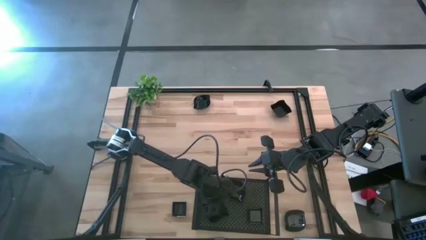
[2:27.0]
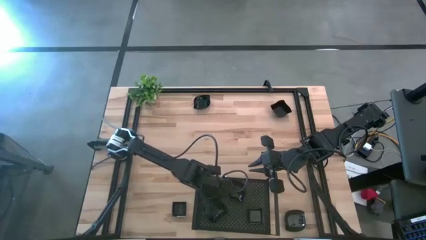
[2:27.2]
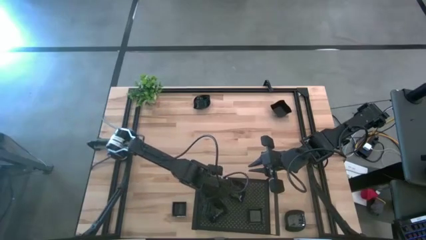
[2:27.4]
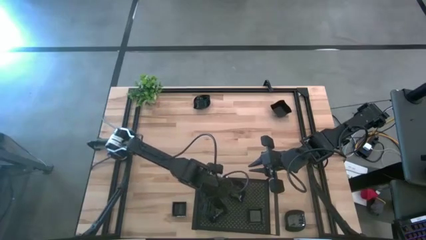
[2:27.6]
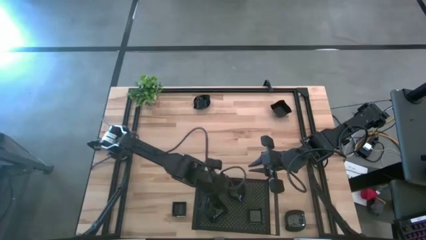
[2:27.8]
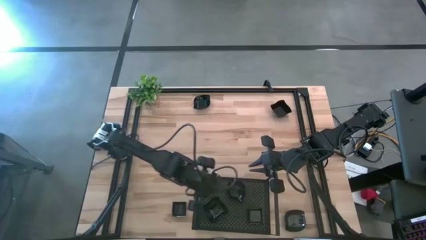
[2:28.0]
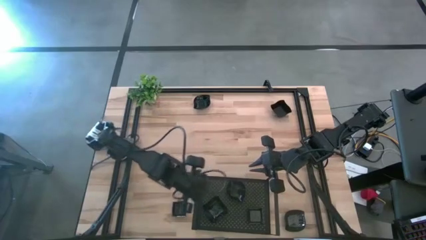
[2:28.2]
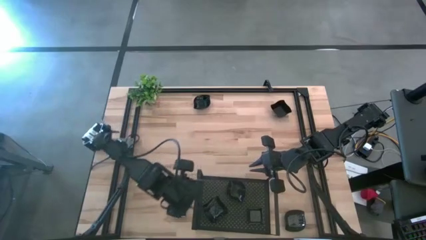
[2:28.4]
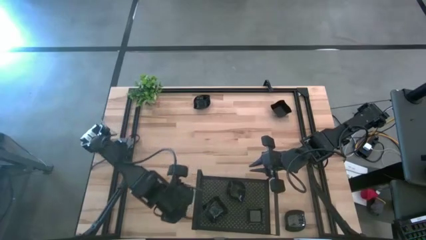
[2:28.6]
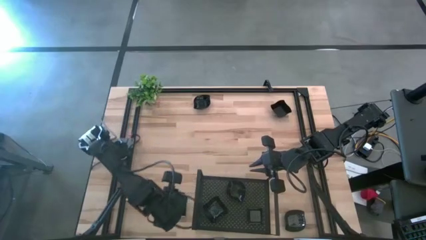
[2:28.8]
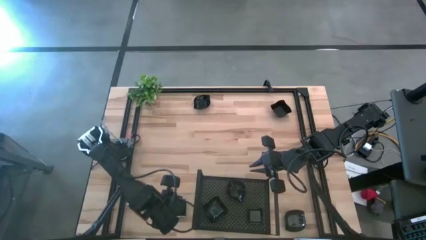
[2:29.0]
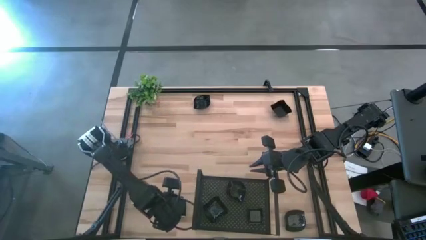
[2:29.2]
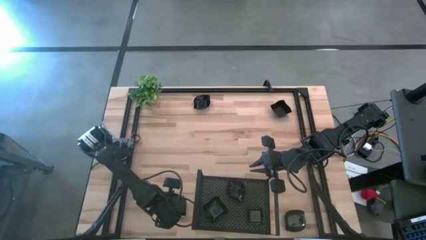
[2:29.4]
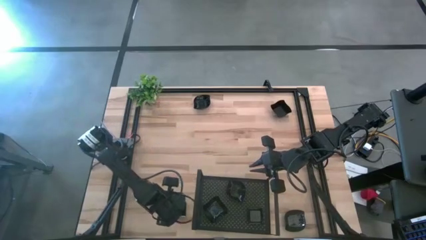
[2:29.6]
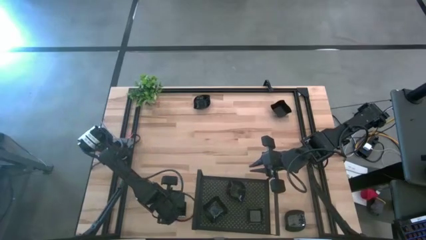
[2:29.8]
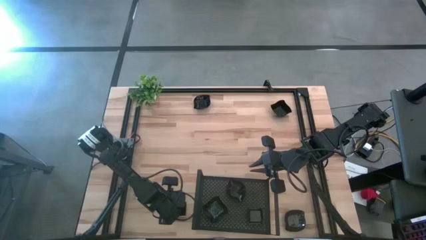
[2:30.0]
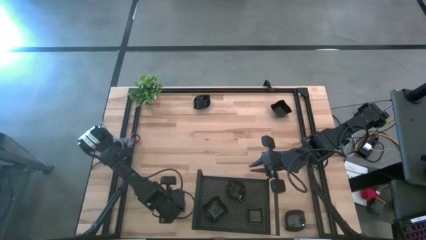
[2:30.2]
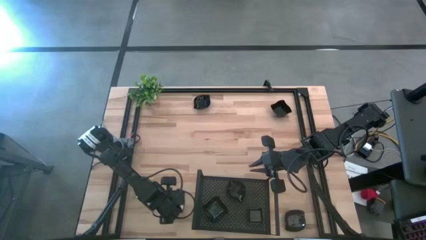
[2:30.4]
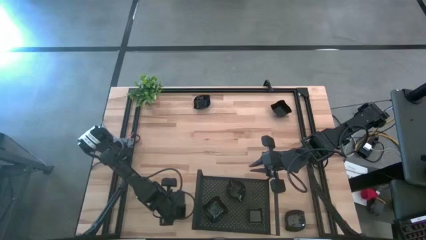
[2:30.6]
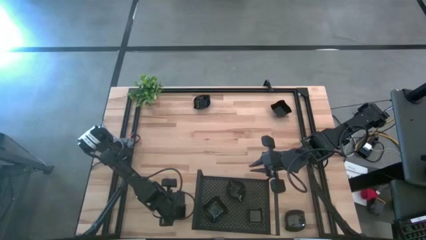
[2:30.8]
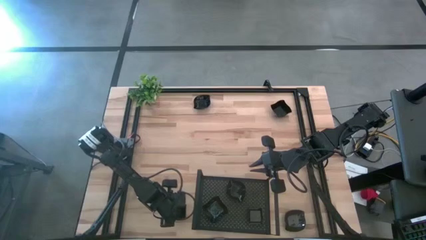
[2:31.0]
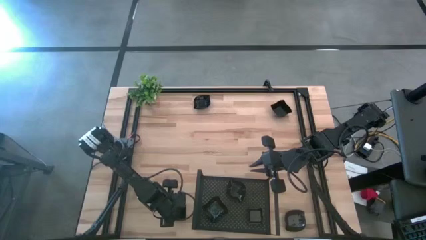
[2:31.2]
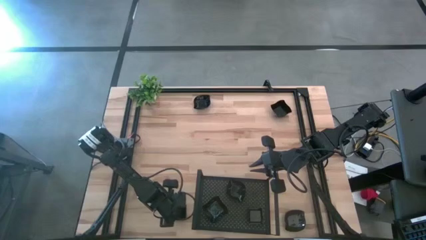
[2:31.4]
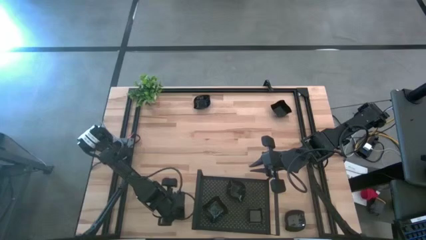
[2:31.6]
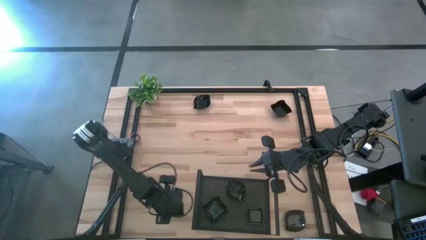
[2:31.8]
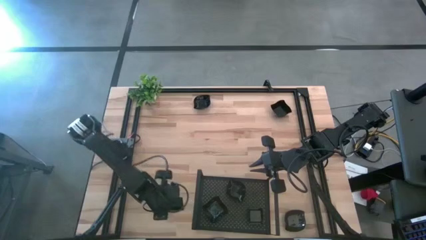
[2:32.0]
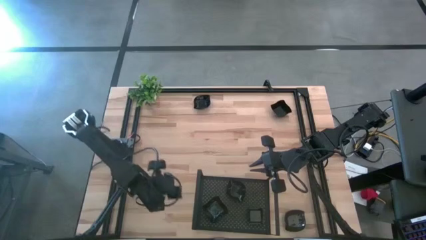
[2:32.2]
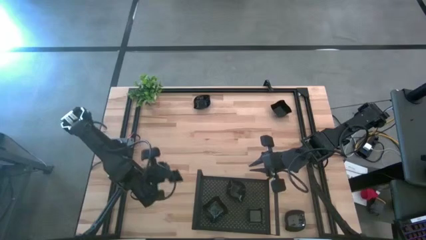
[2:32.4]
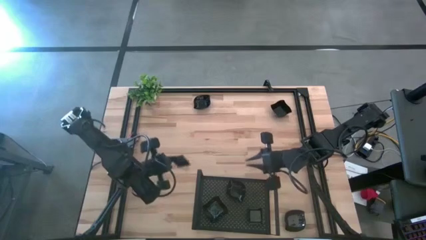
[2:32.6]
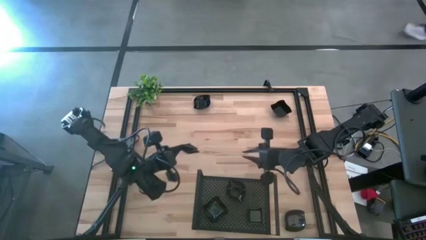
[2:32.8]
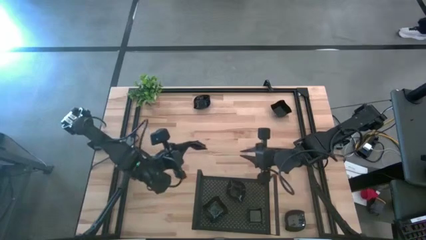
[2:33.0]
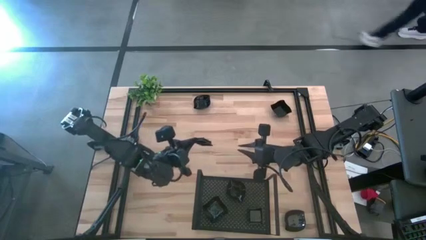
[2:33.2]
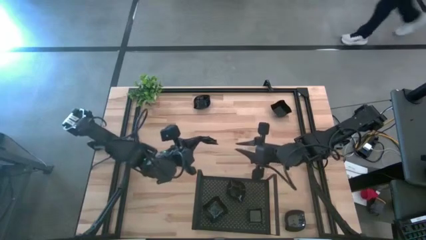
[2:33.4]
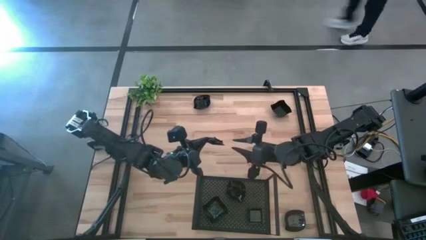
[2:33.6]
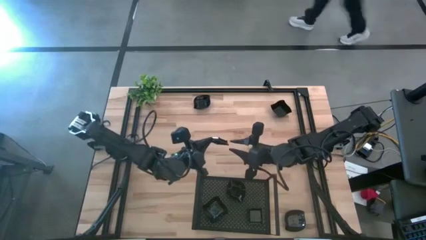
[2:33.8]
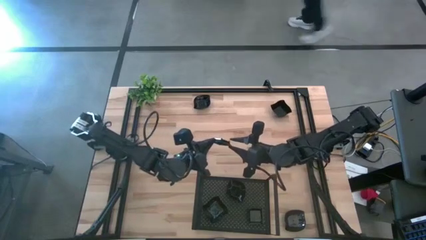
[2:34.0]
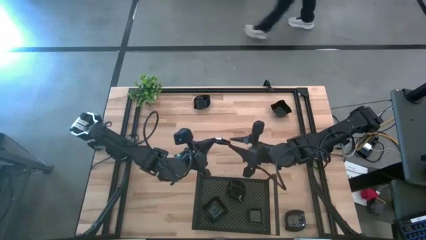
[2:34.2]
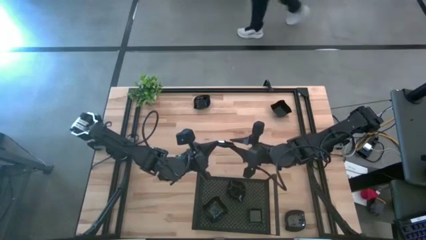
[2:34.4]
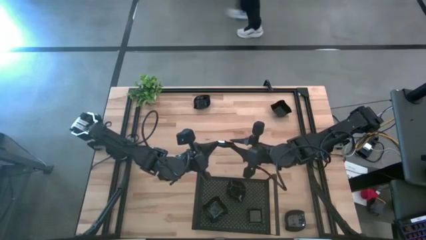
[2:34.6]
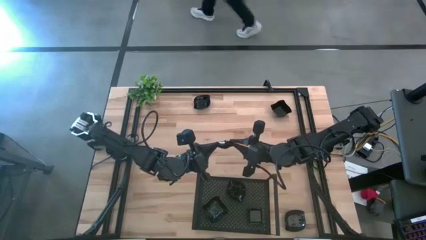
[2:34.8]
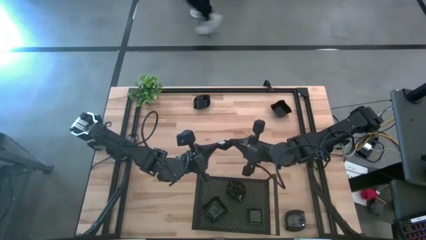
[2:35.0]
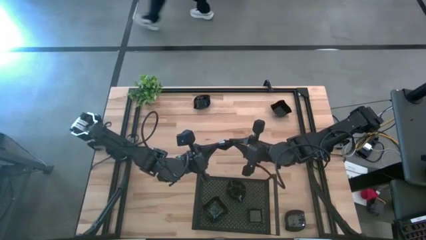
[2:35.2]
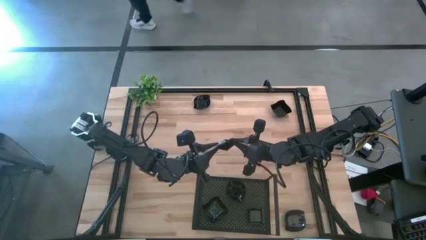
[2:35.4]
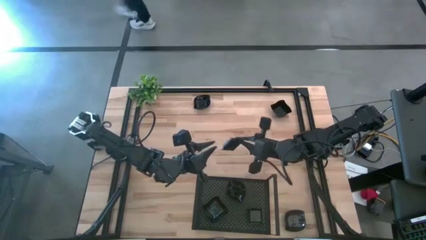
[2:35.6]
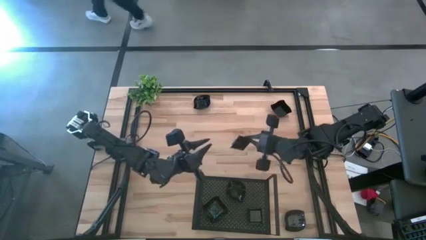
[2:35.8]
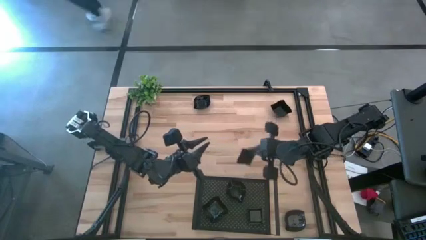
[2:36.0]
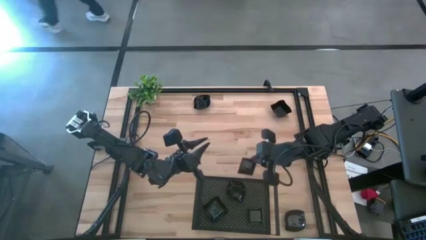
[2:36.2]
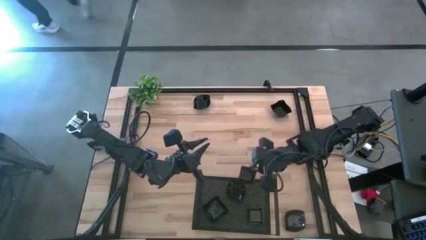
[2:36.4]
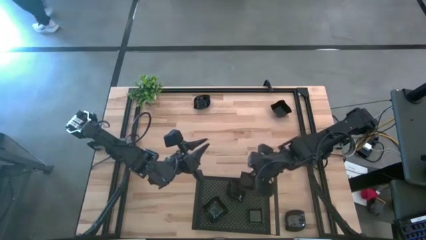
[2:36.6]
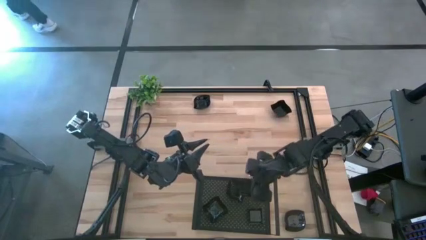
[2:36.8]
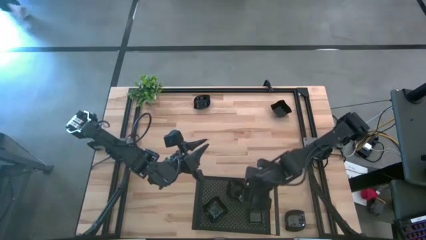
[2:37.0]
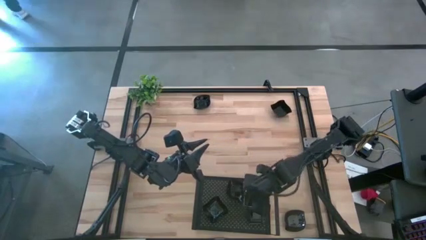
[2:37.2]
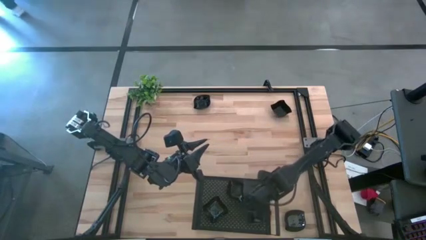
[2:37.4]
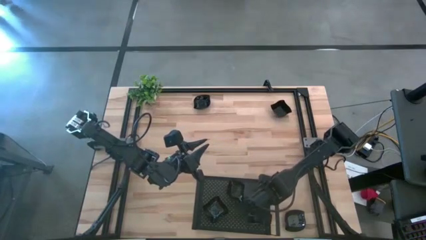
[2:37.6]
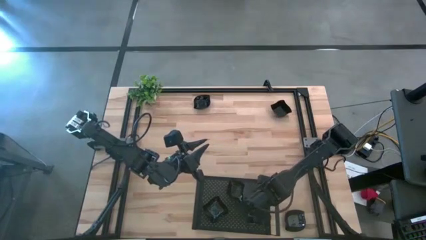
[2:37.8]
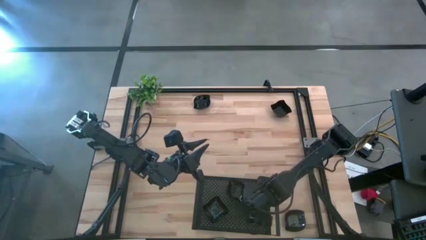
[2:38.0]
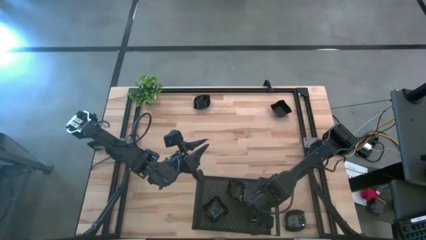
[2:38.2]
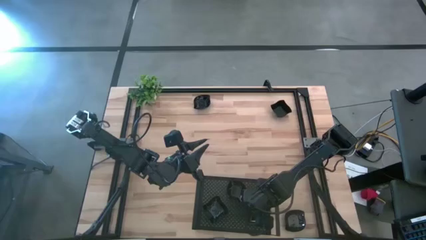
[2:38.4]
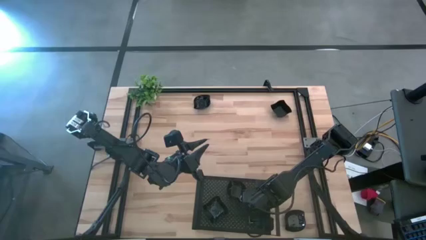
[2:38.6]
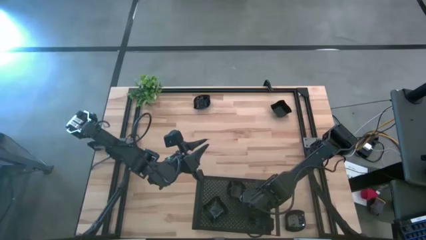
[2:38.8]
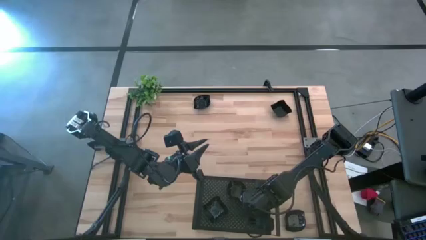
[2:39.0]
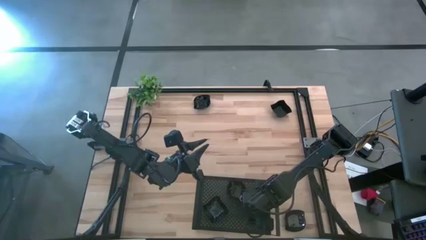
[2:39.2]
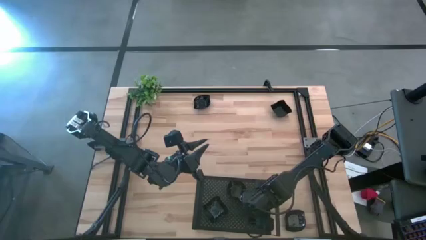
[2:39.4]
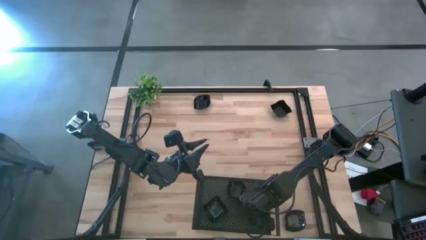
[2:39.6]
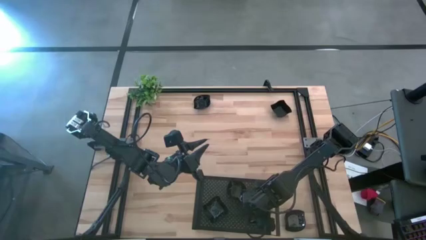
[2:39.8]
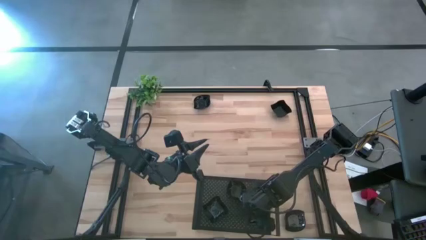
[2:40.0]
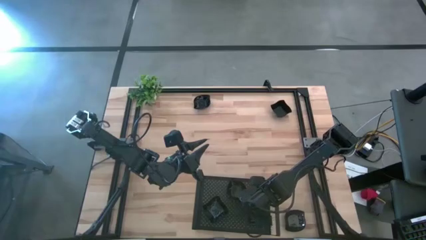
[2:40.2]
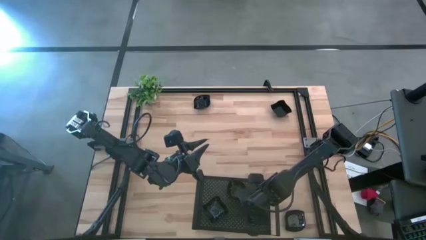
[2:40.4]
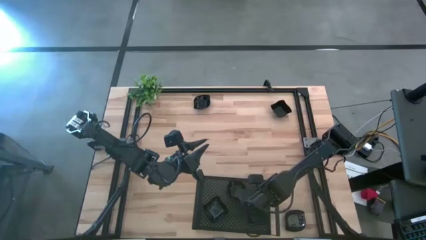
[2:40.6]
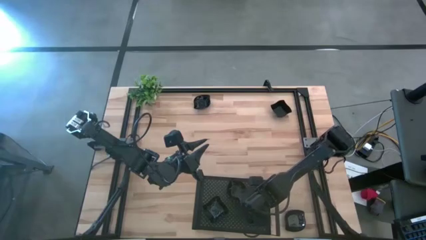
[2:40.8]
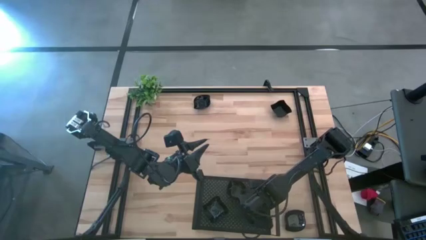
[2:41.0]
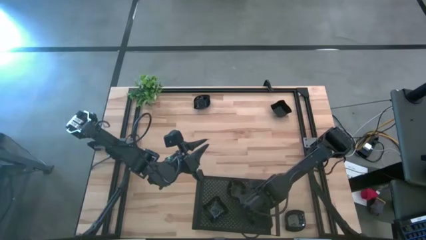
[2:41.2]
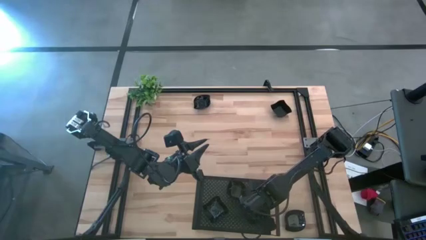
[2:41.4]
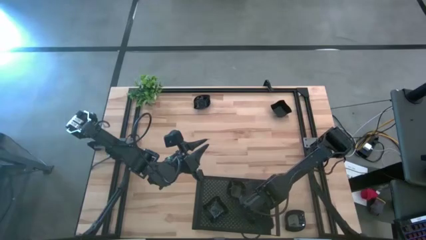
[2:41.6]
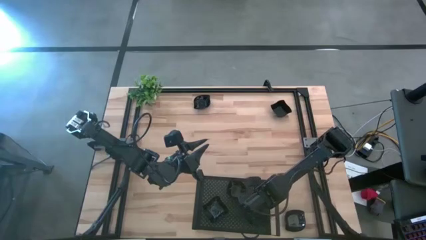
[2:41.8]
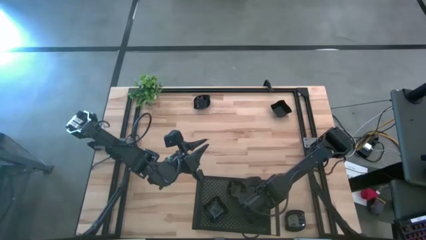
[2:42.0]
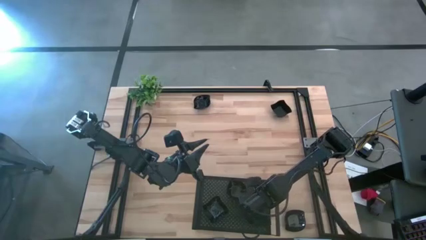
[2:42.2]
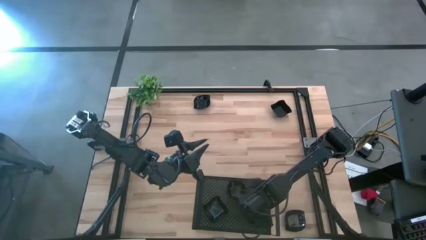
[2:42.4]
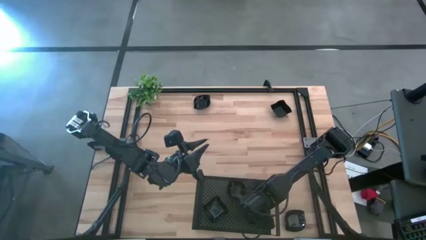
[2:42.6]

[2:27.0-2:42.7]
Task: Pick & Place Mini shaped plates
Stack the square plate on top of the other square plates on the shelf
